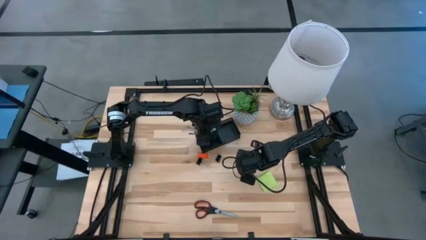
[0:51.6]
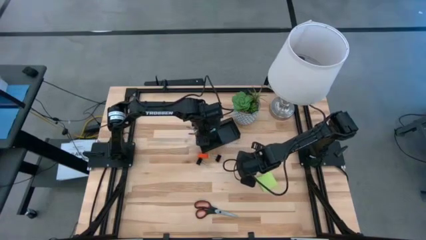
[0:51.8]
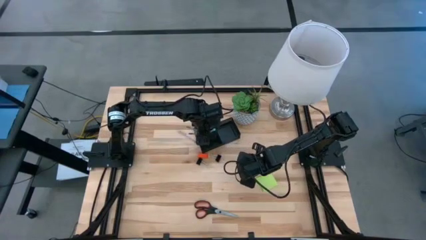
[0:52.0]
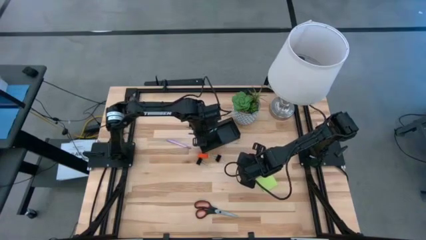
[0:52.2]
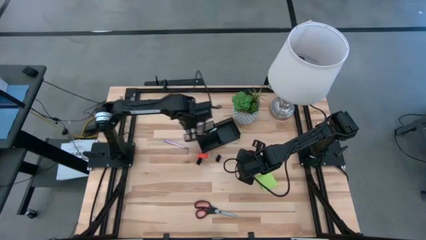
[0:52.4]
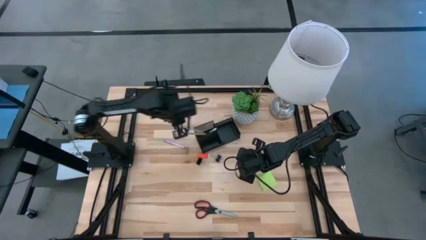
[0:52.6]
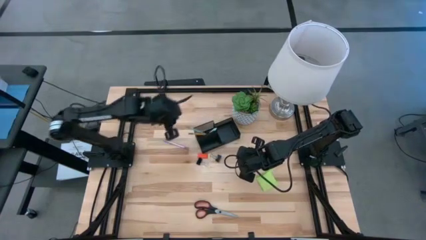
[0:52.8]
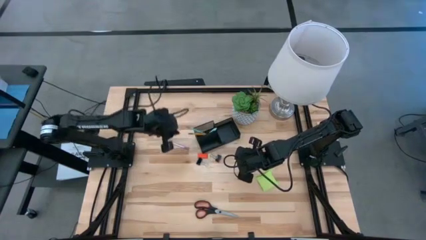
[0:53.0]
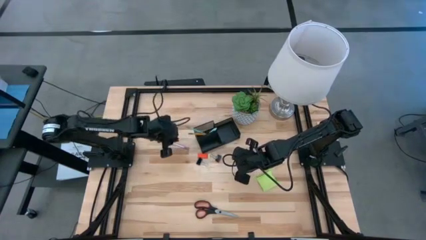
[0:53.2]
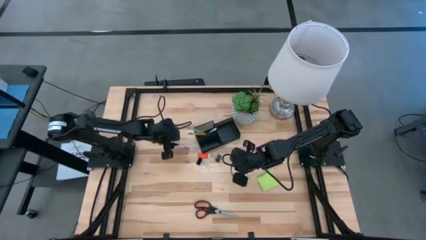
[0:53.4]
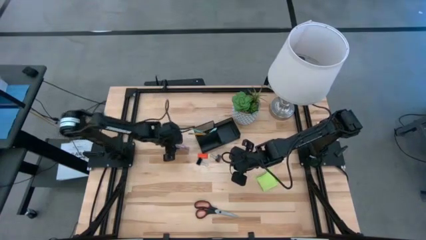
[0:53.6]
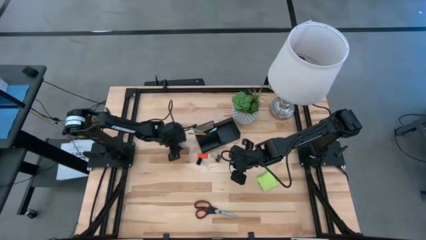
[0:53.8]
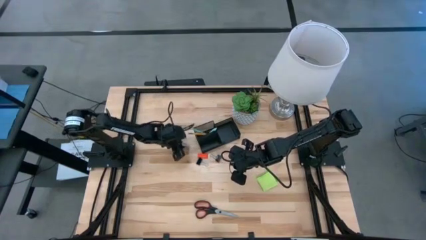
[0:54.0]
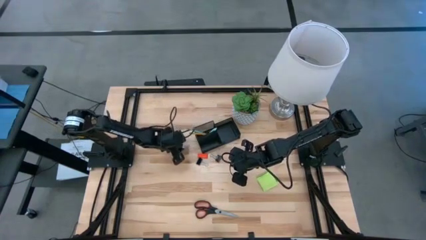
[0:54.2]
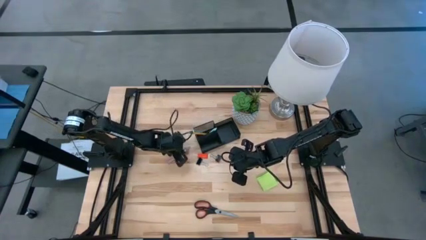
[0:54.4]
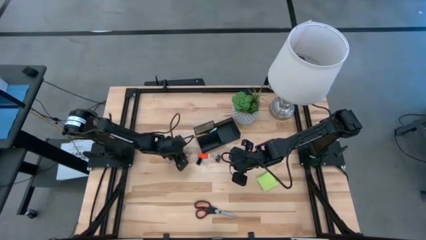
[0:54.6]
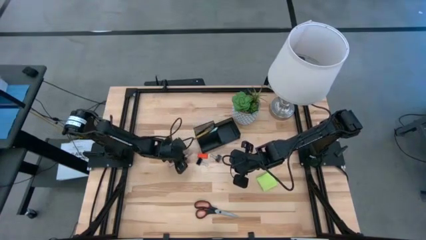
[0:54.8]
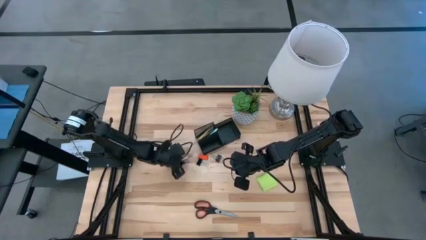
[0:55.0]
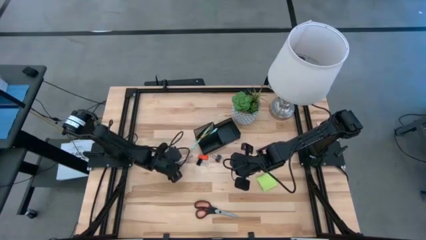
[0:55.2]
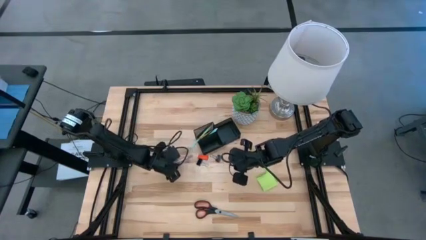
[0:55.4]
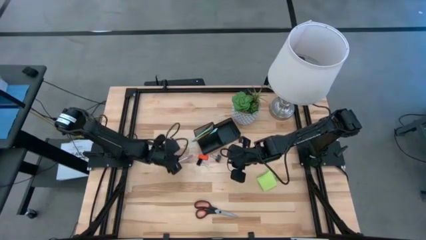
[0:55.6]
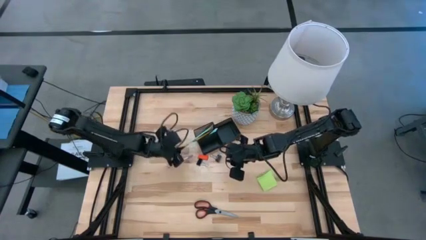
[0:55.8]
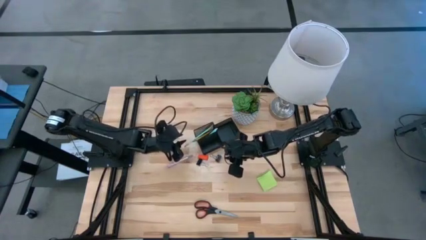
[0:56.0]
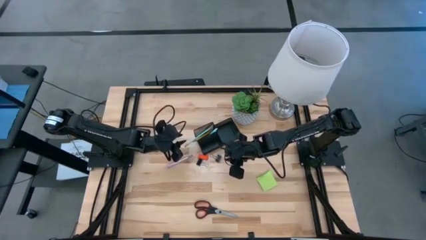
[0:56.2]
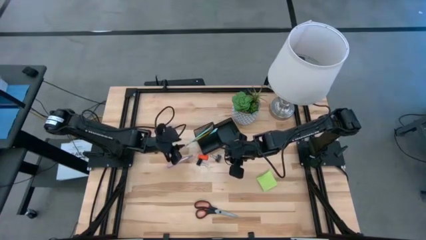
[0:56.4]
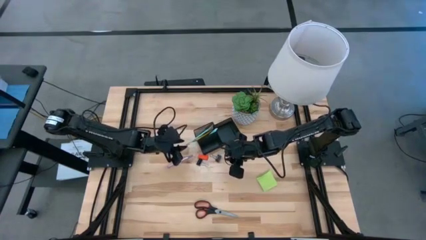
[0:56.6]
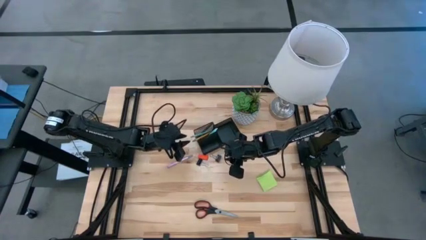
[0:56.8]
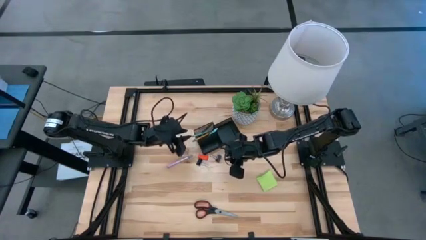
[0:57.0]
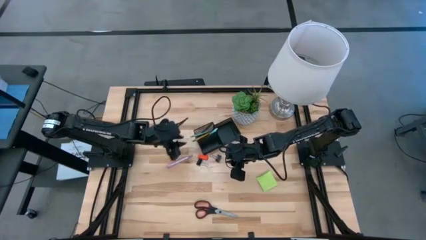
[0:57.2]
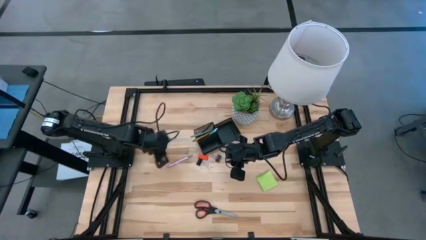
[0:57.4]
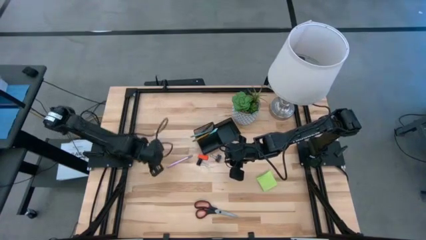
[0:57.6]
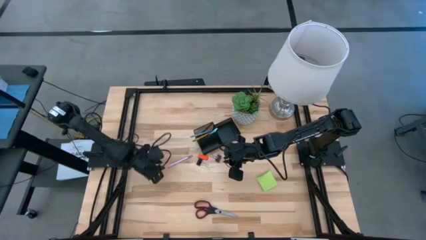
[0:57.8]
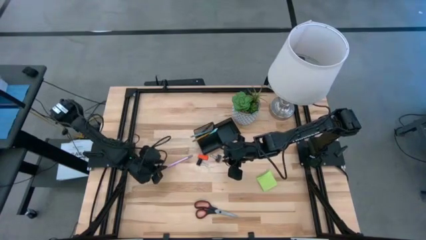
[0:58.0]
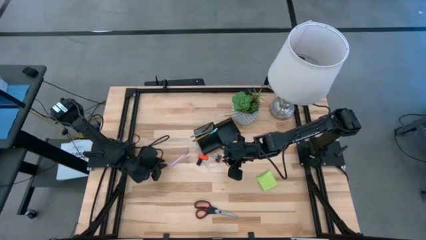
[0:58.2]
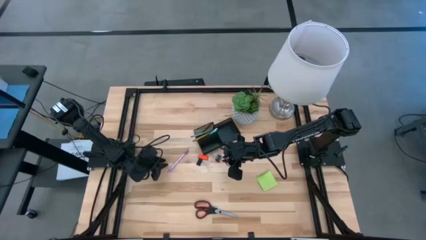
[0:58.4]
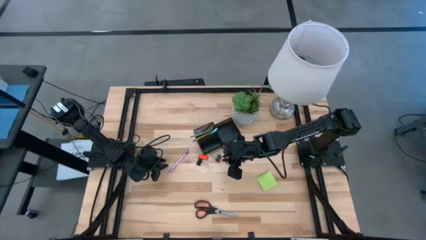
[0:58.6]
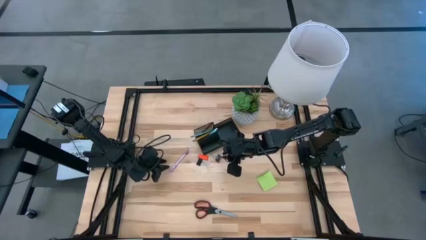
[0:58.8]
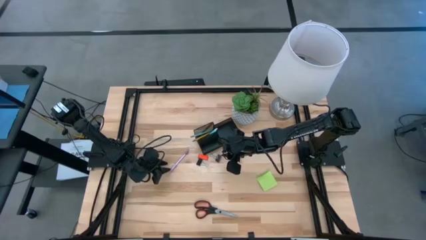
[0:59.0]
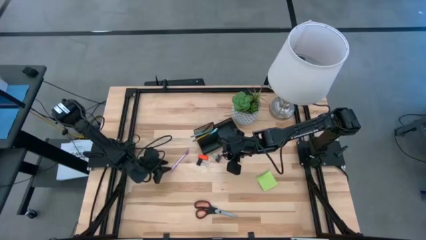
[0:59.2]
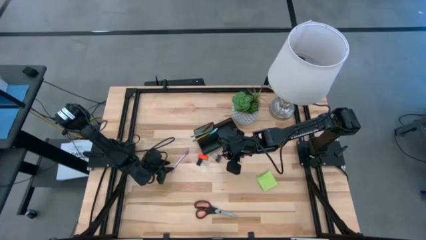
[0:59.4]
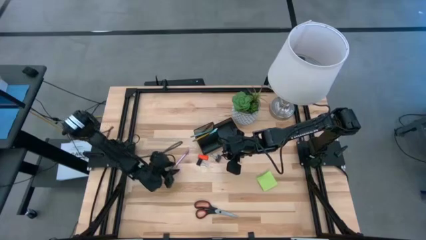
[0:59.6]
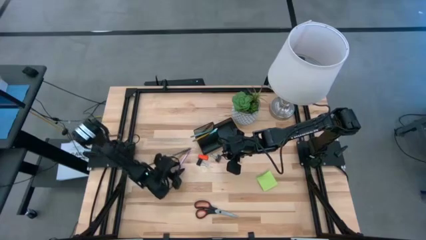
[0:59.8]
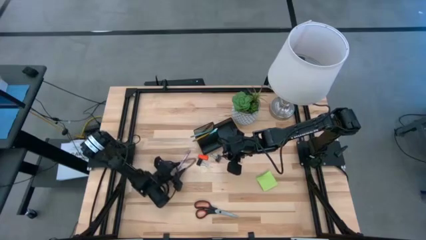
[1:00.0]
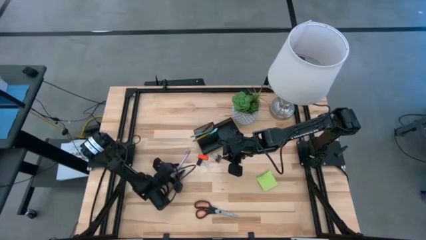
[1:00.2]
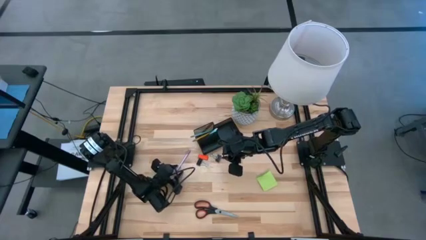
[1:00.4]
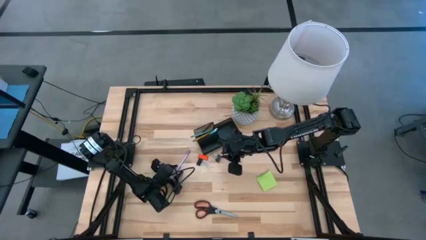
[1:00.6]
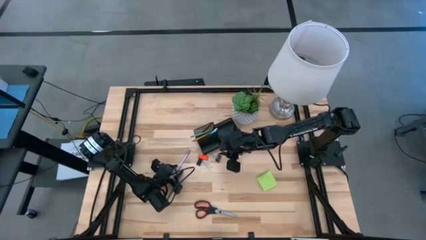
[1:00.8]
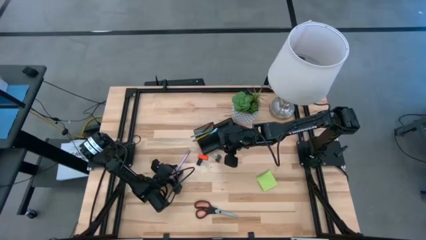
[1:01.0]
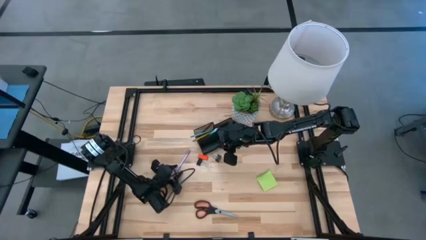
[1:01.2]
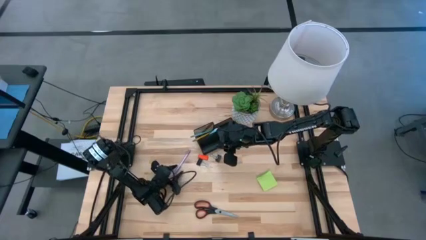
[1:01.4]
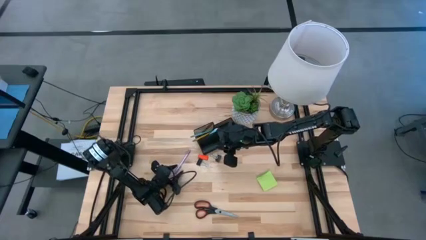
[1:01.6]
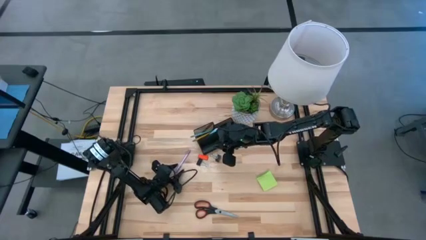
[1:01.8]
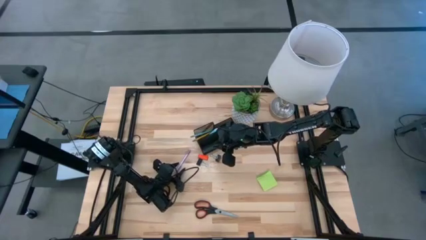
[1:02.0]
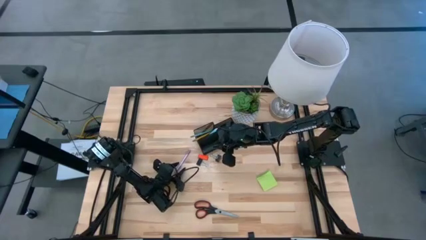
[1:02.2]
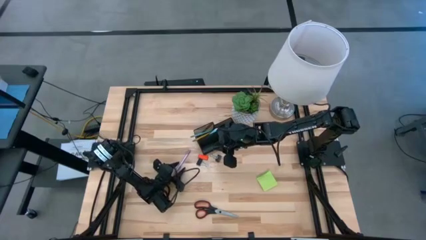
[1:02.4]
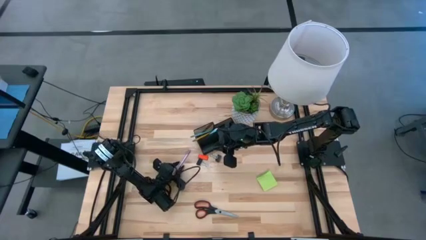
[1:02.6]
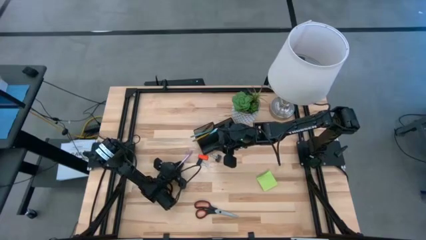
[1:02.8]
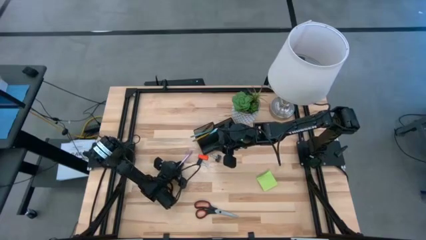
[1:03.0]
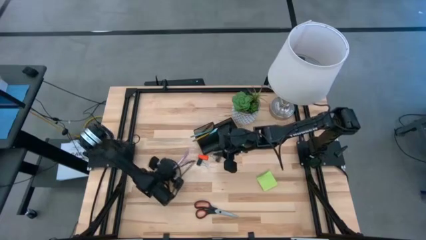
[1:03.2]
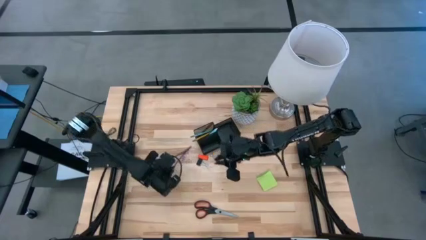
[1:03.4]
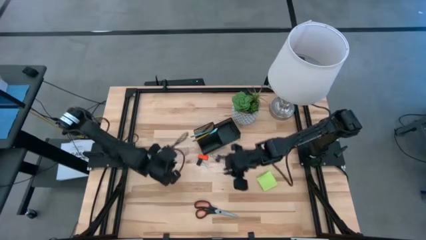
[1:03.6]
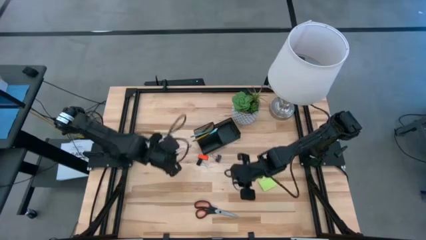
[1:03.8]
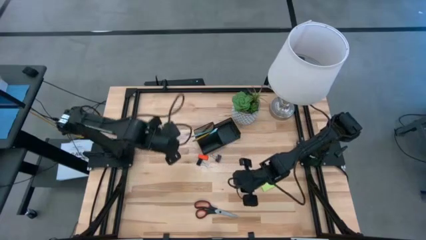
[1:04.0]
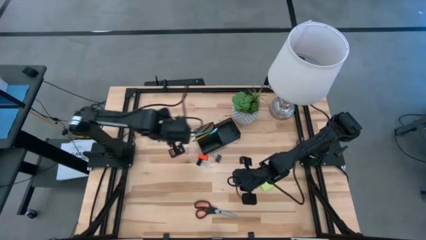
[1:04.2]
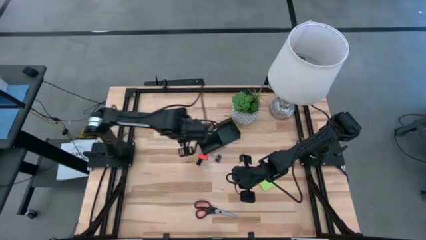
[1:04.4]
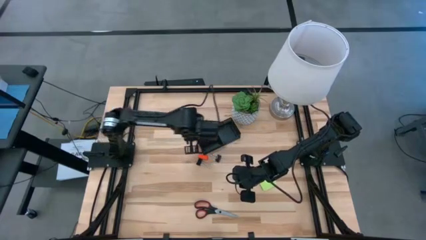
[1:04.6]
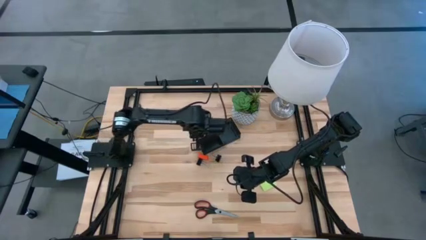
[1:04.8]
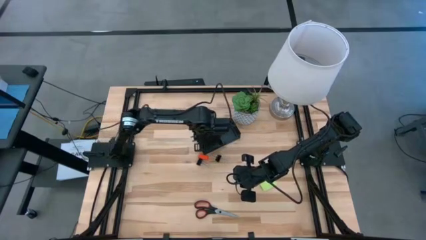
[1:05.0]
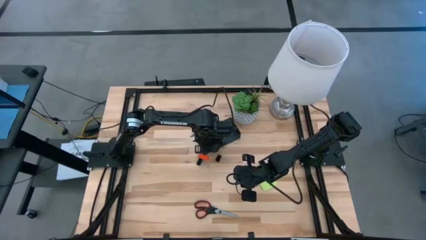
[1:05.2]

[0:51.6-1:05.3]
Task: Pick and place office supplies into organizer
Put the light purple pen into the black desk organizer
